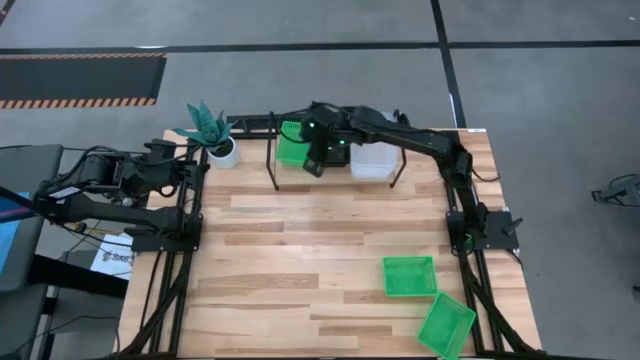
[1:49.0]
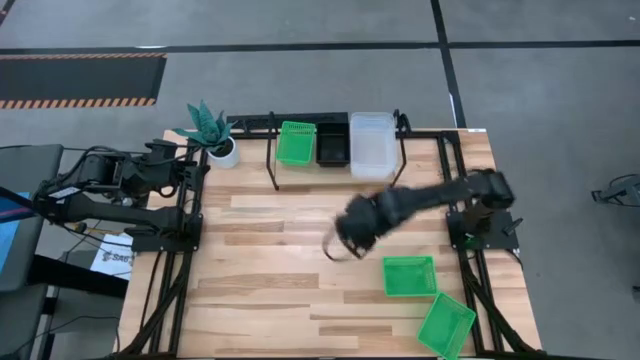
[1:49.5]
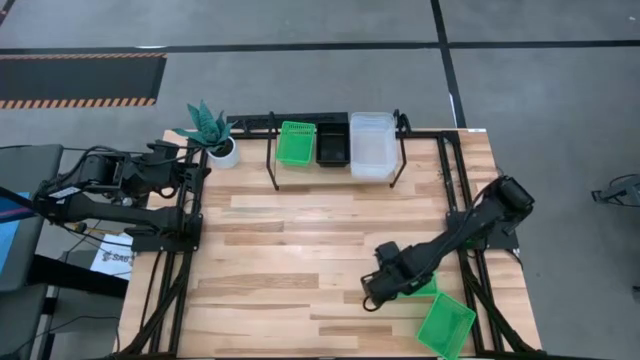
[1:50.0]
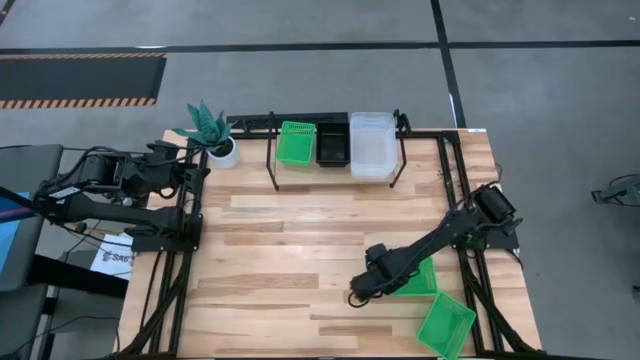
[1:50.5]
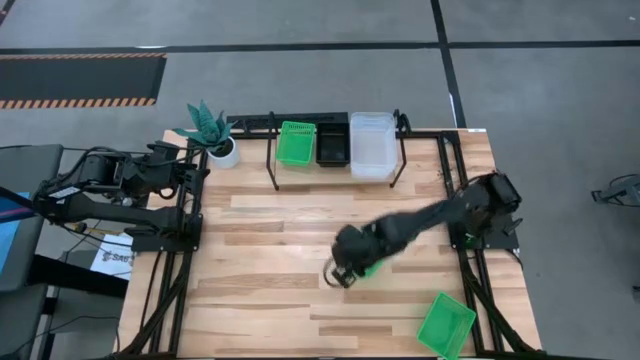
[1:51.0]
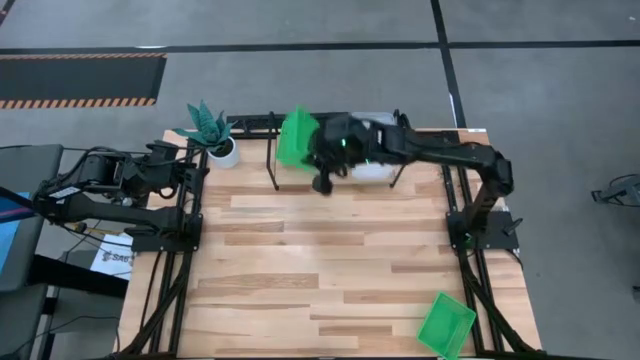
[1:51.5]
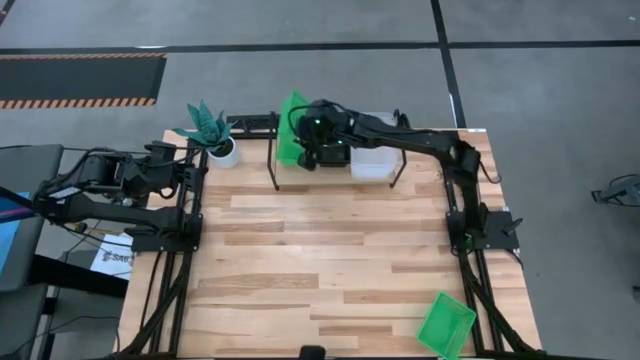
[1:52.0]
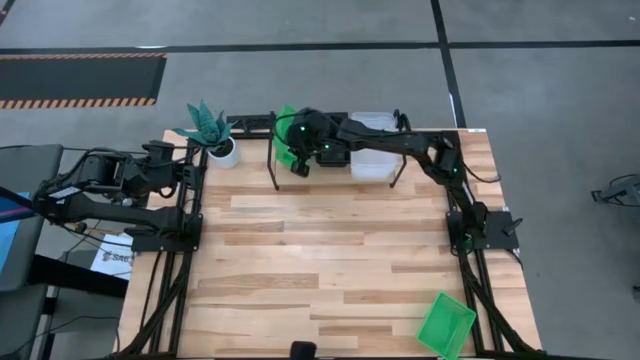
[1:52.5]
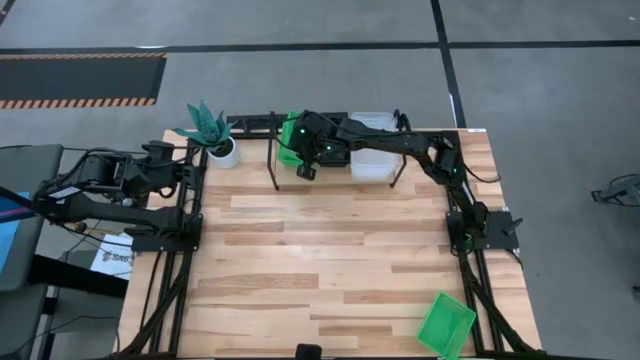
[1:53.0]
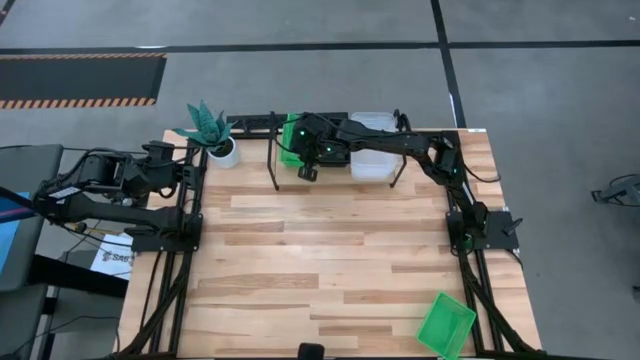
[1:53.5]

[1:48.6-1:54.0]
Task: Stack baskets on shelf by color
Stack the top green bin on top of the green bin on the shelf

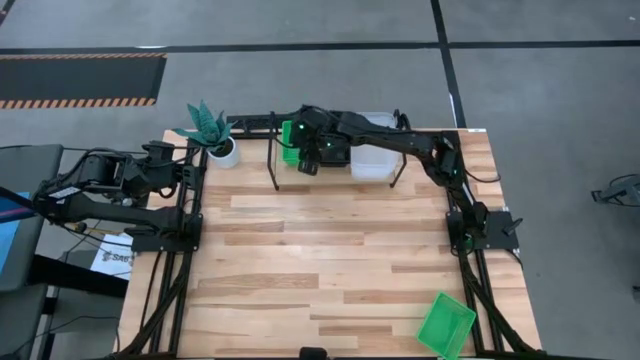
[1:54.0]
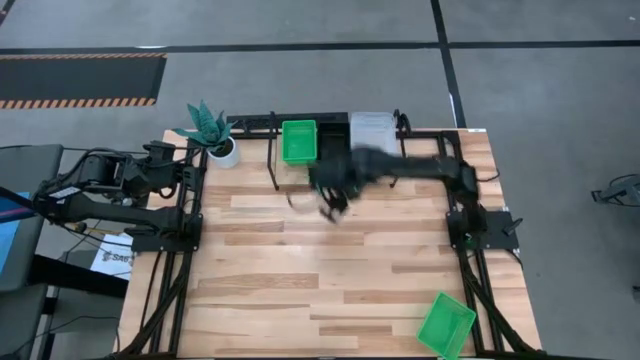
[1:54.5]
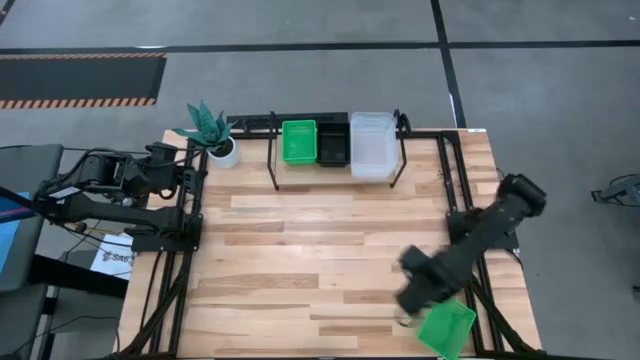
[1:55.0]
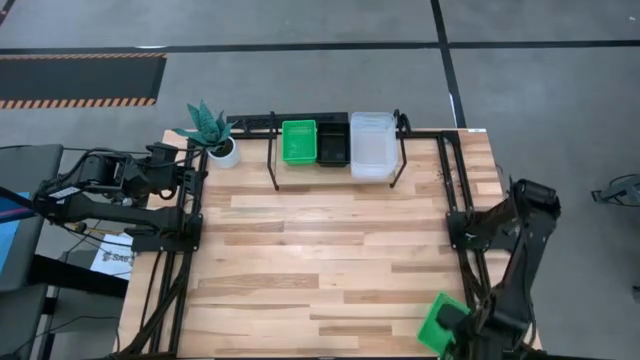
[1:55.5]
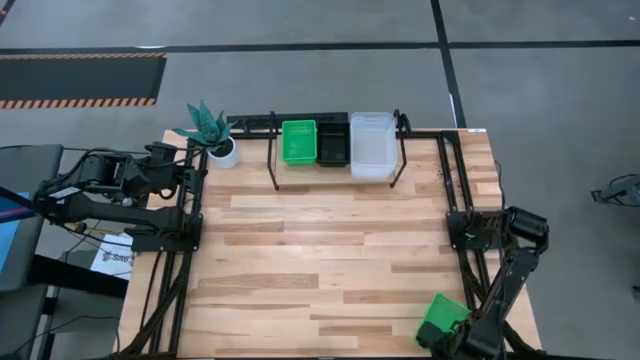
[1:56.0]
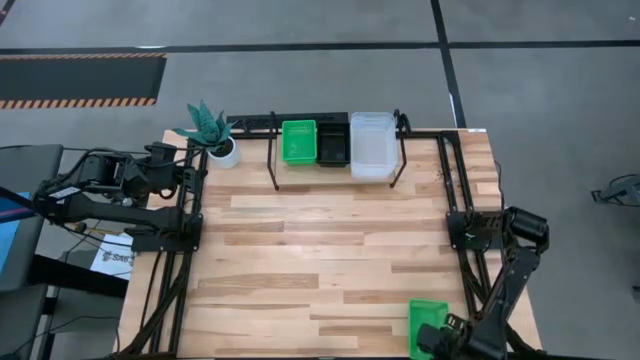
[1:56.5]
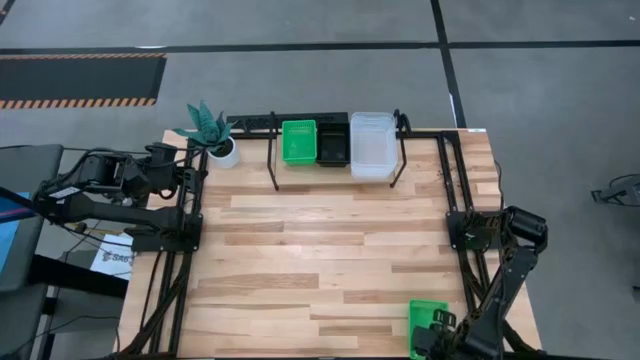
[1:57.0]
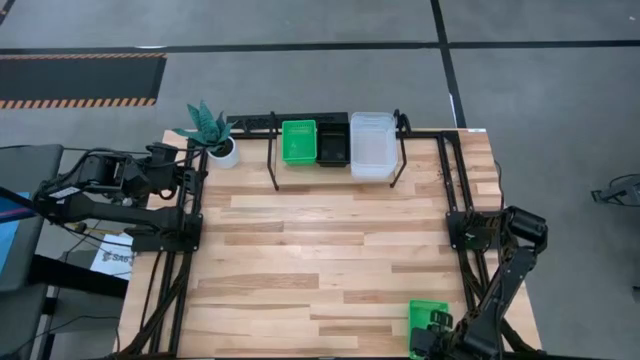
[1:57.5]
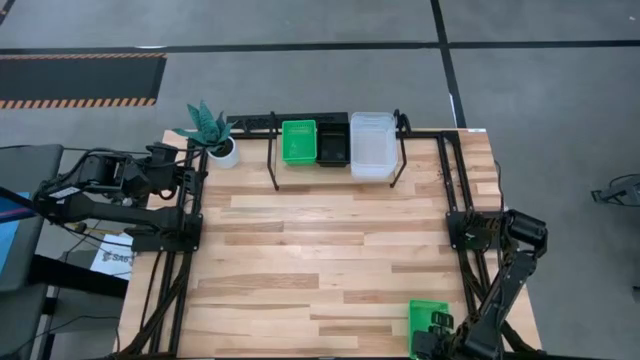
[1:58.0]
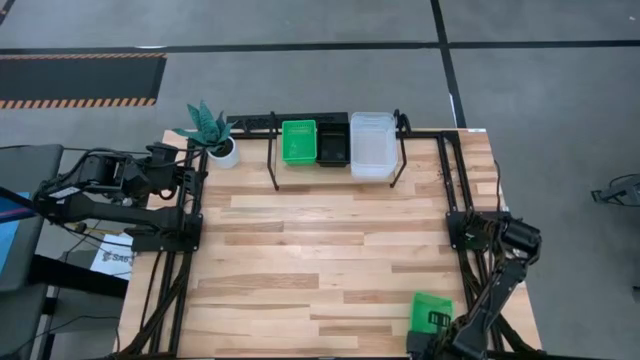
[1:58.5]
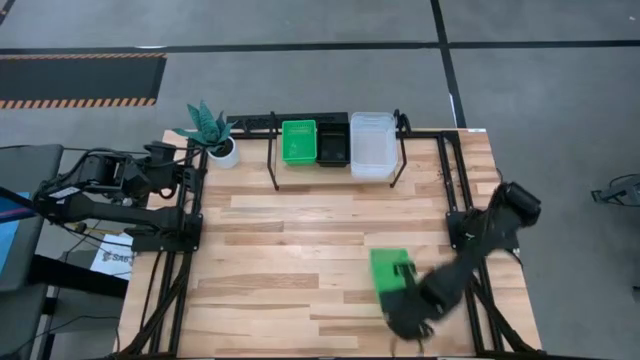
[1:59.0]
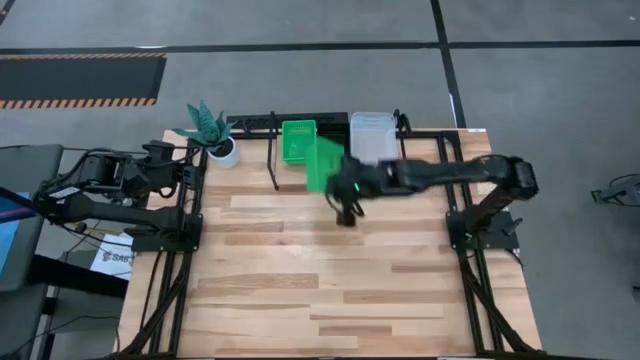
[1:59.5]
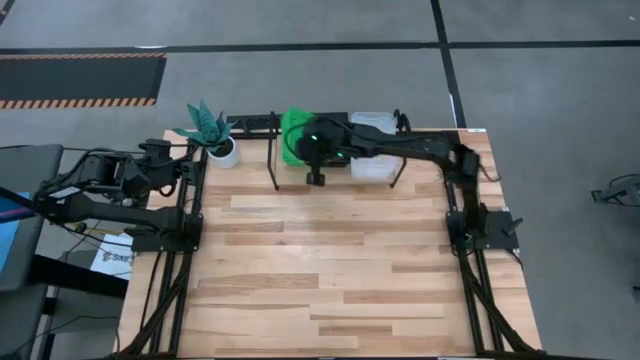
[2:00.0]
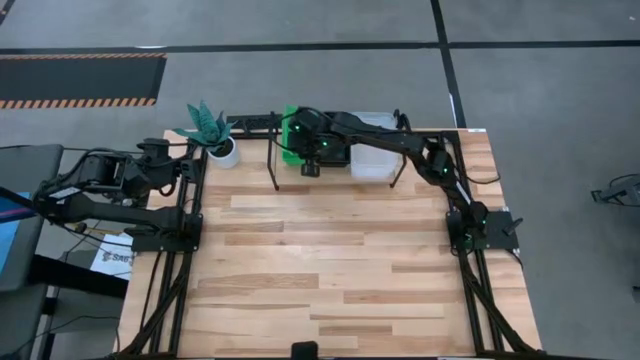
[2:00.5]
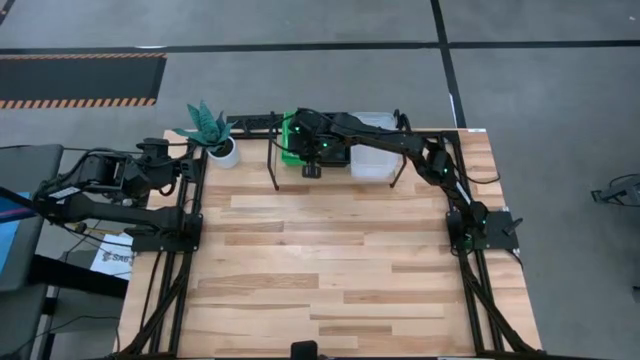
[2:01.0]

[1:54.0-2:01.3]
Stack the green bin on top of the other the green bin on the shelf

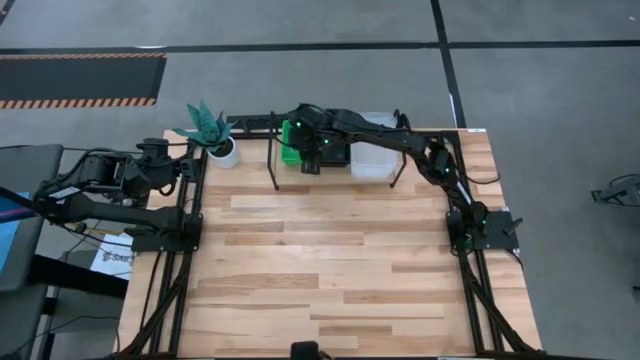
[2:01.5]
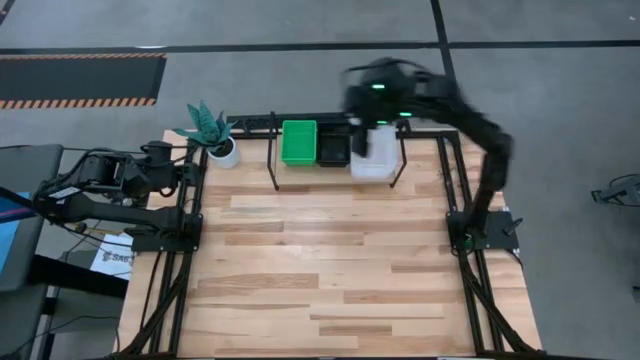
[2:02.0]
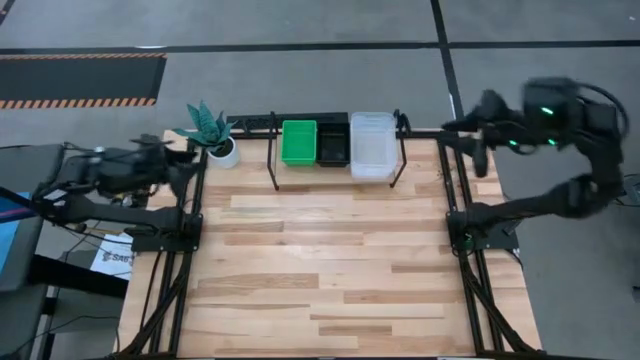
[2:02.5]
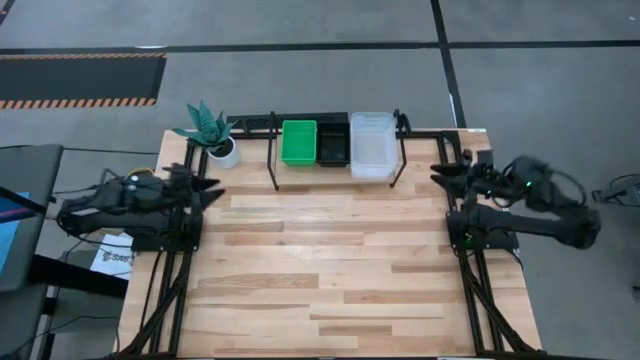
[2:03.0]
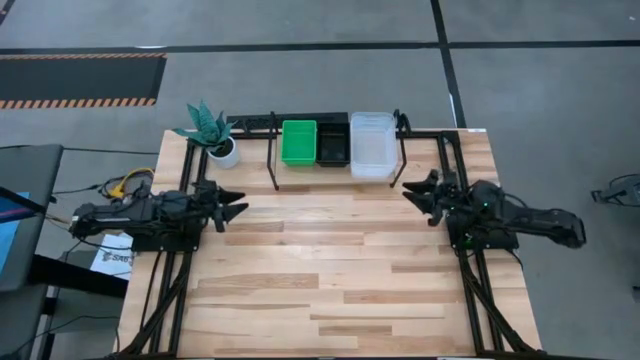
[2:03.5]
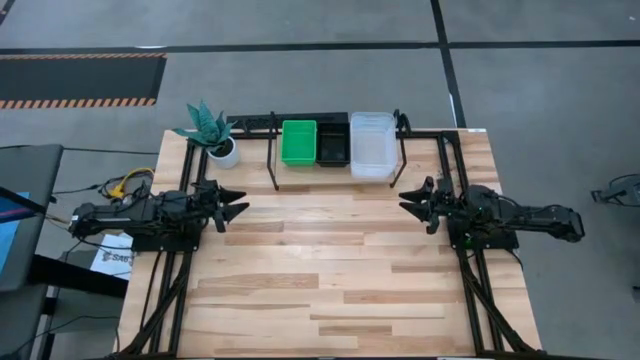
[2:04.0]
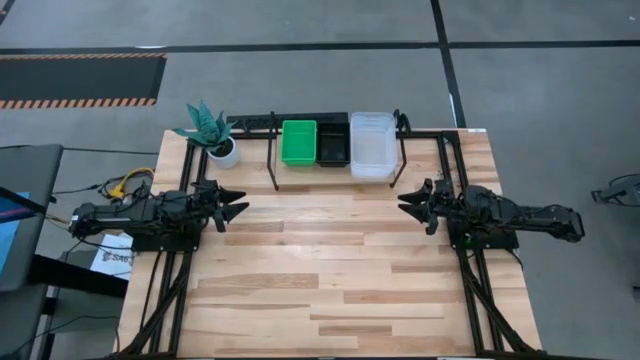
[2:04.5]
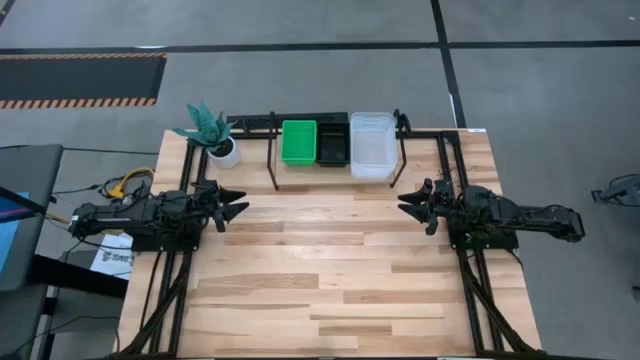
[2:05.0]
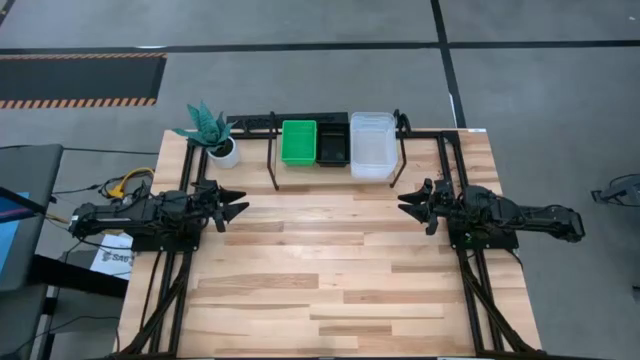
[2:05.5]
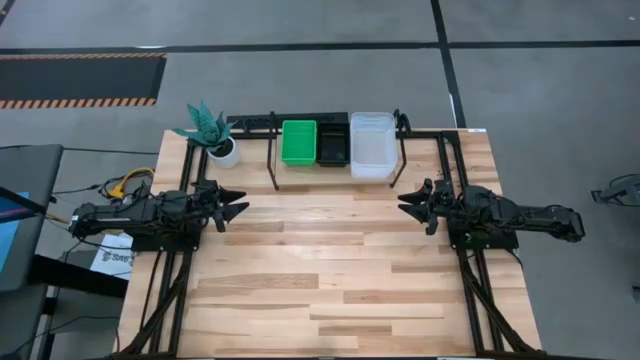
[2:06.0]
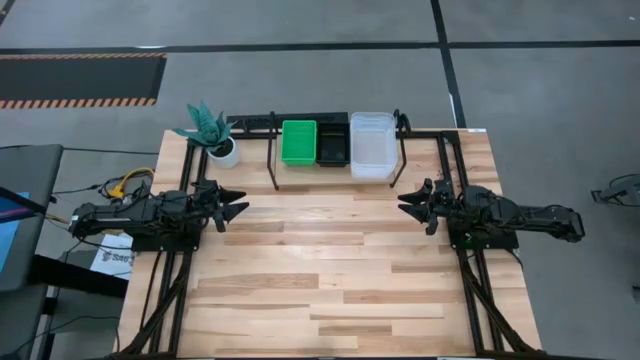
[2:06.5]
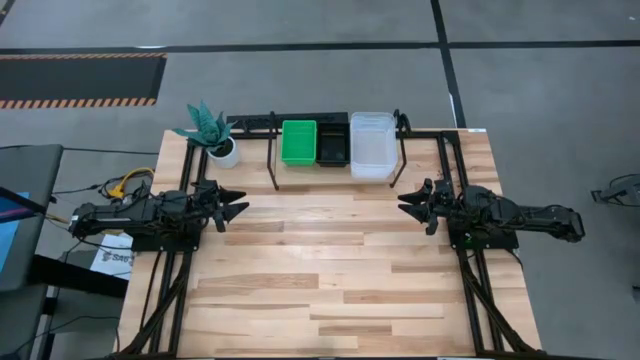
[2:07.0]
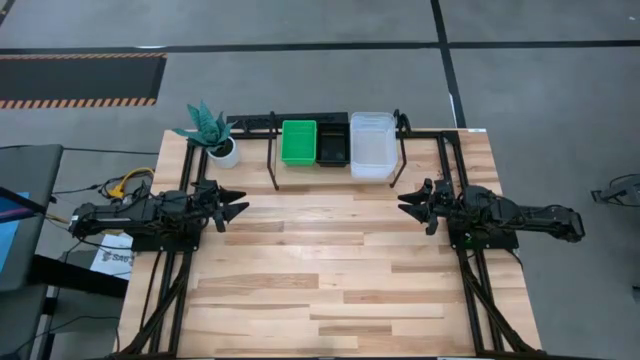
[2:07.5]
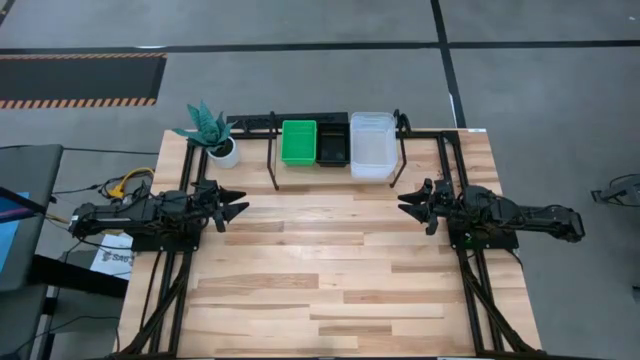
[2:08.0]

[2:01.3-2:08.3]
Return to Home Position

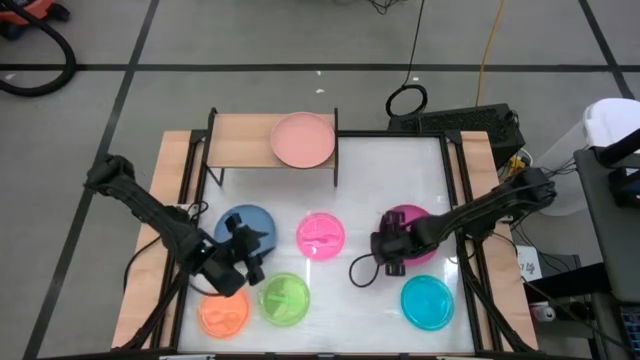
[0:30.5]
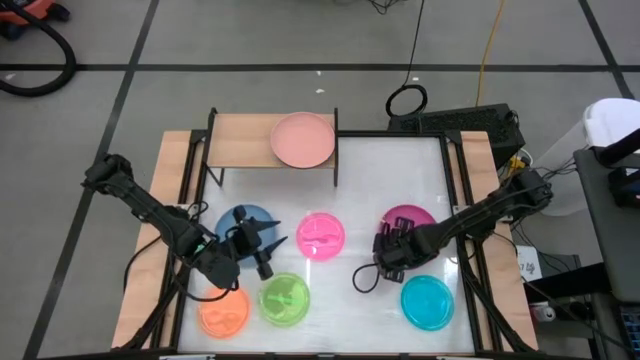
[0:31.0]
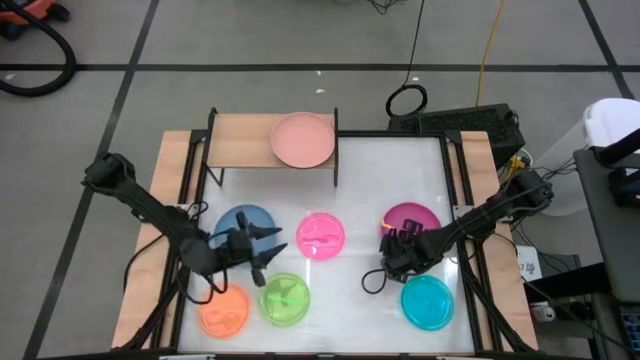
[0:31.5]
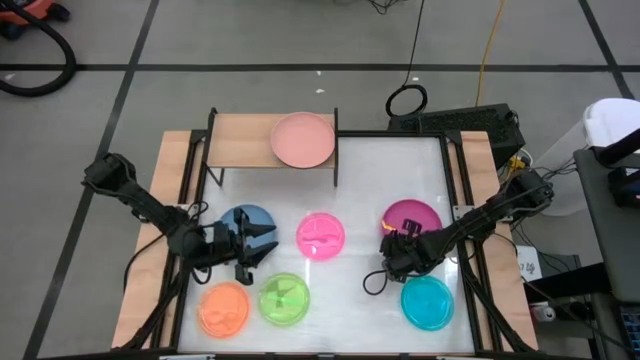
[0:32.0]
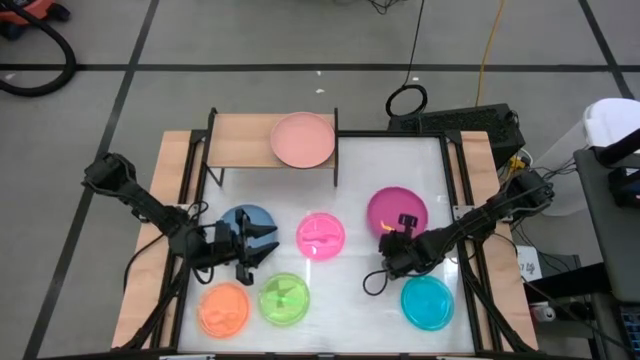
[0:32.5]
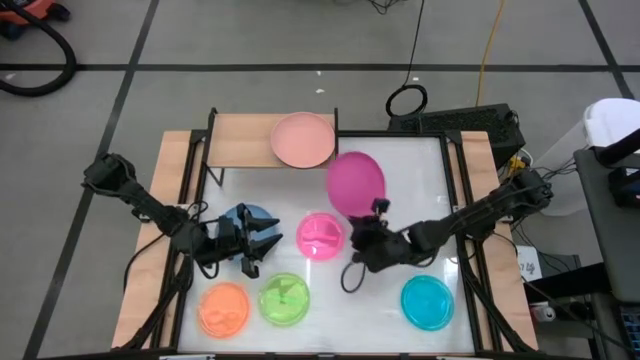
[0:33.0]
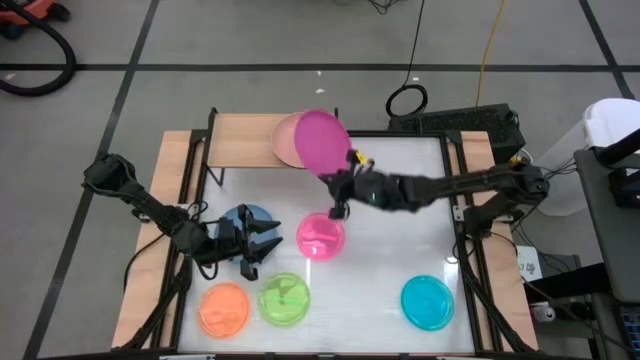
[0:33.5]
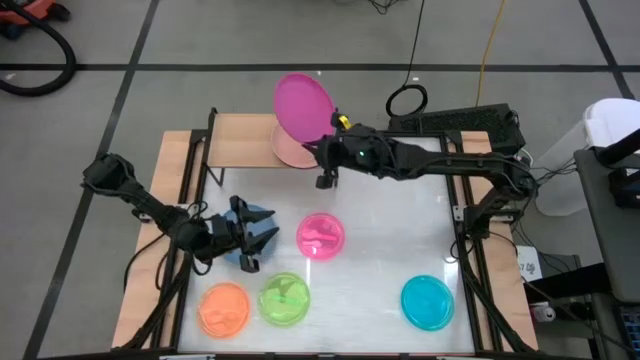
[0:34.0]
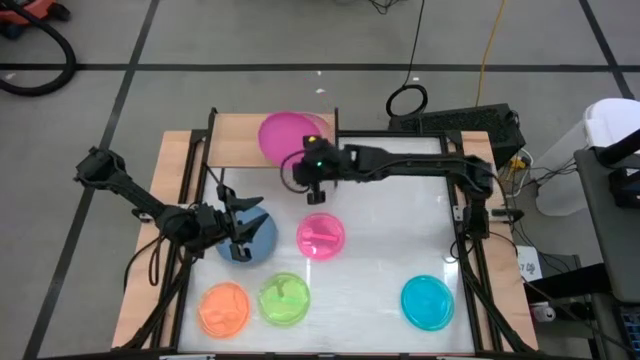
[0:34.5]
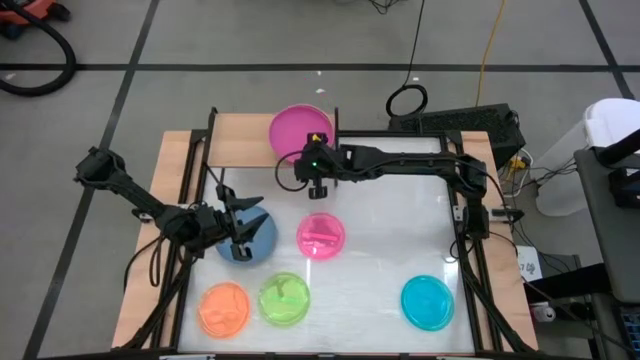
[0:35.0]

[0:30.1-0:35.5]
Task: Place and stack plates onto a shelf
Stack the pink plate on top of the peach plate on the shelf
